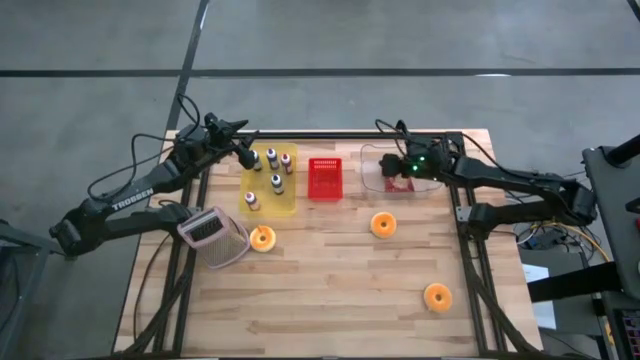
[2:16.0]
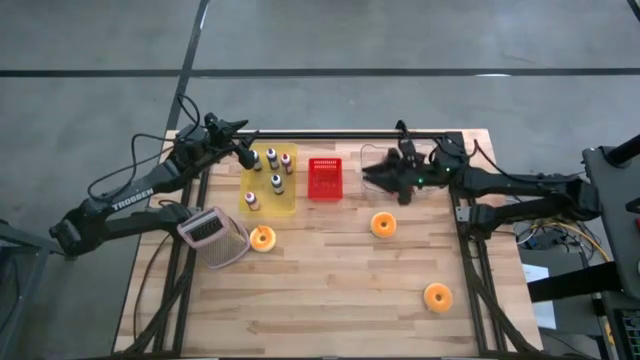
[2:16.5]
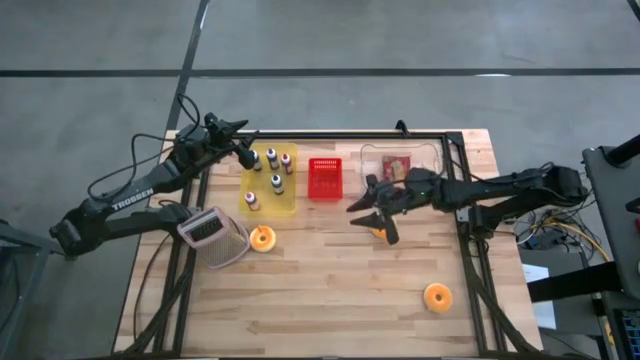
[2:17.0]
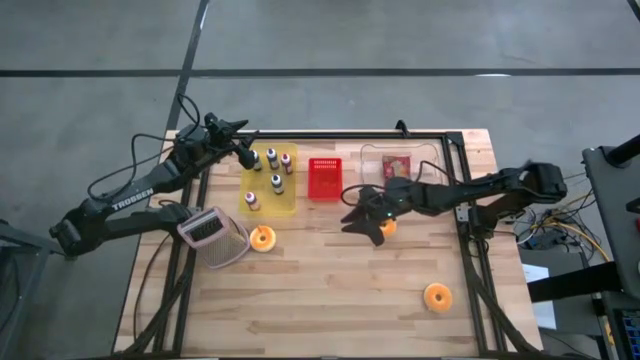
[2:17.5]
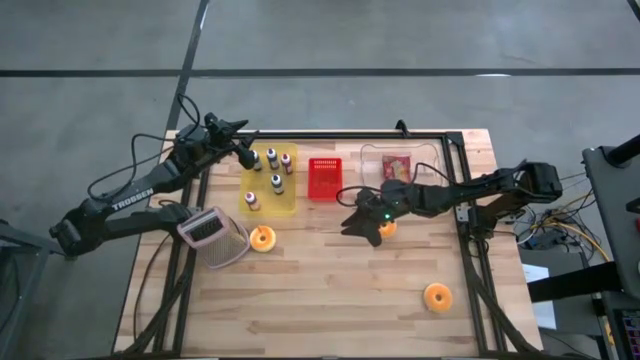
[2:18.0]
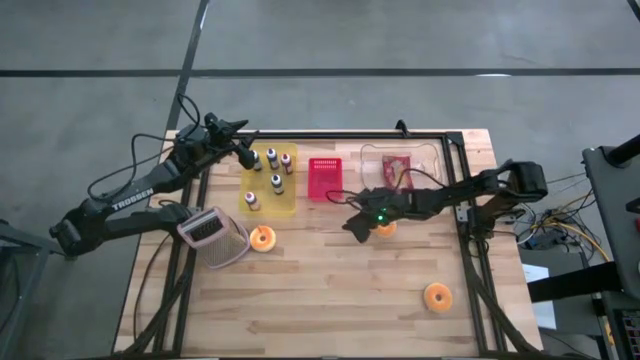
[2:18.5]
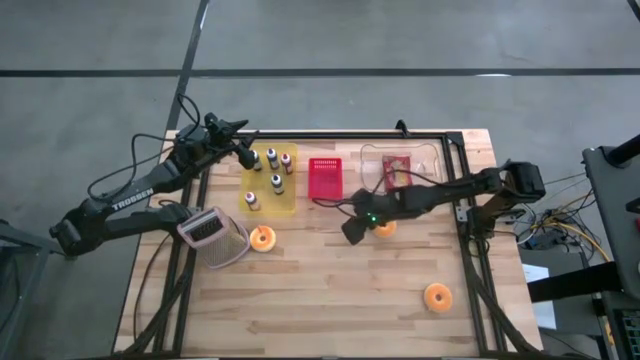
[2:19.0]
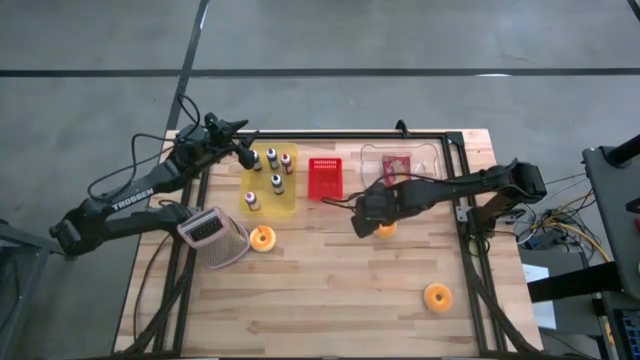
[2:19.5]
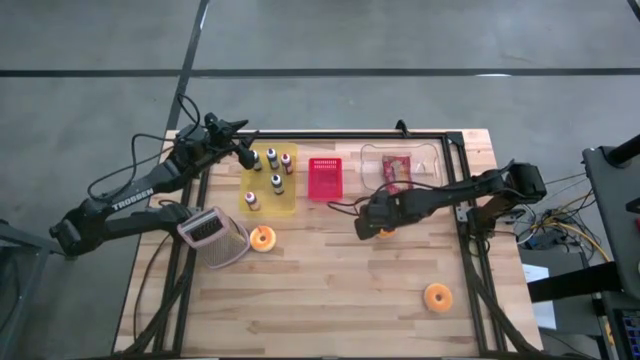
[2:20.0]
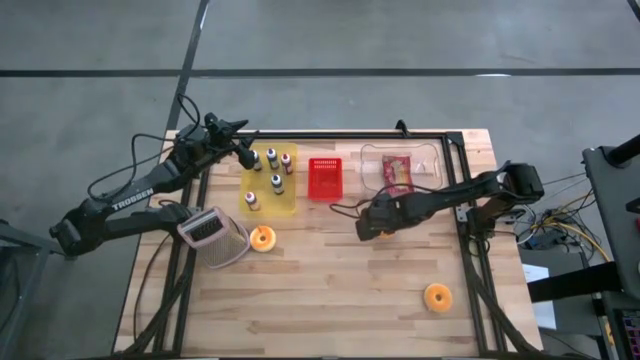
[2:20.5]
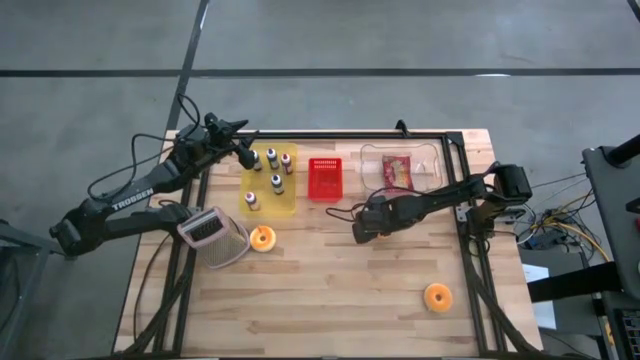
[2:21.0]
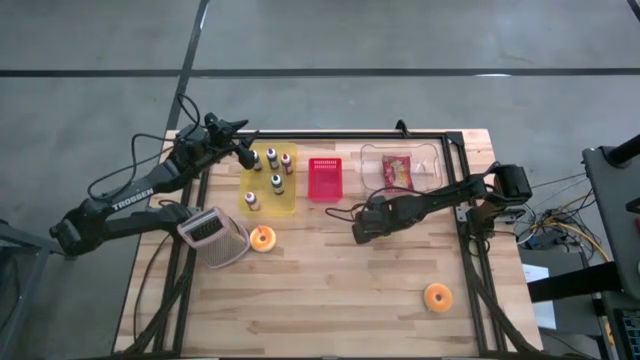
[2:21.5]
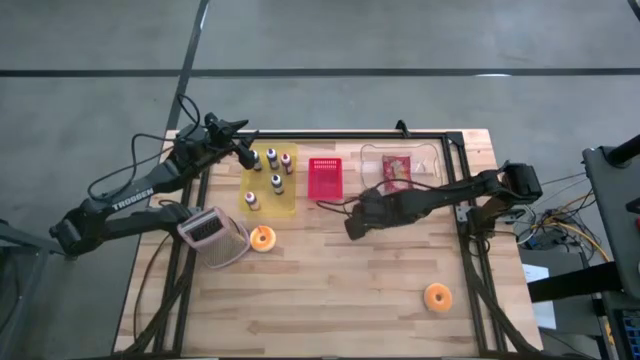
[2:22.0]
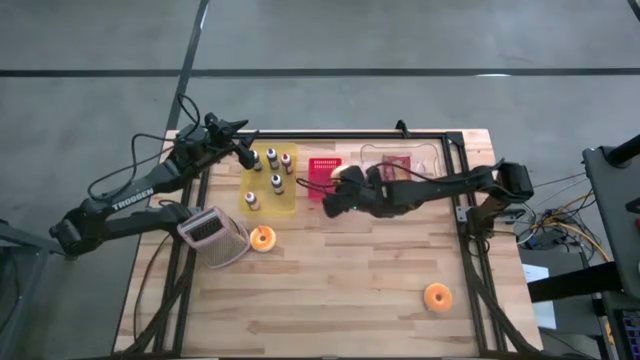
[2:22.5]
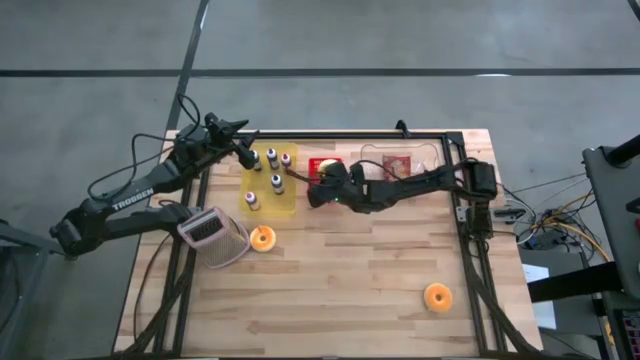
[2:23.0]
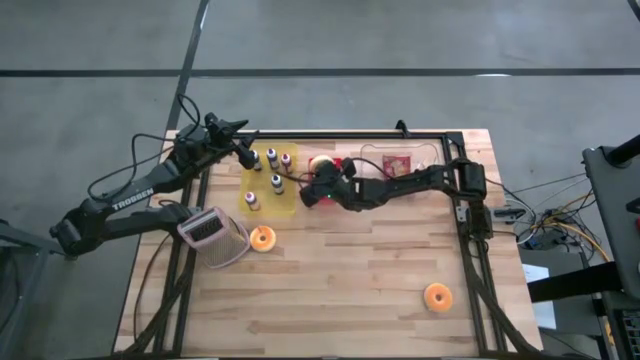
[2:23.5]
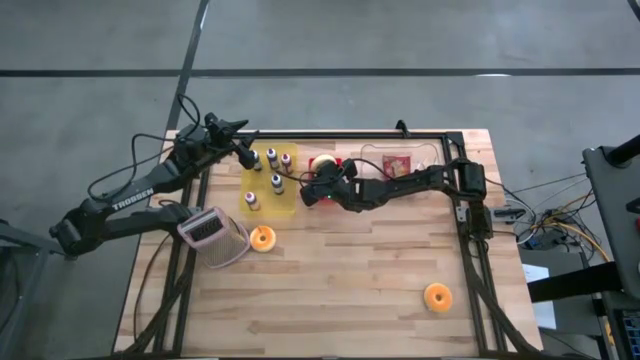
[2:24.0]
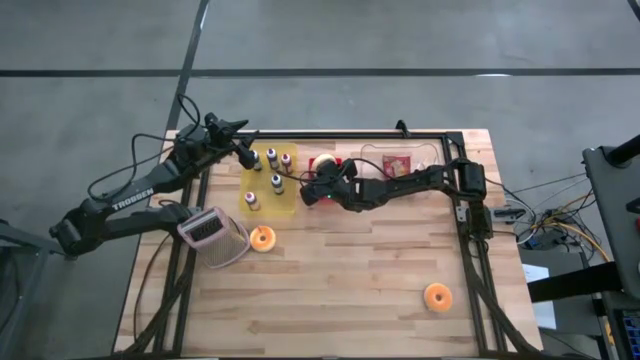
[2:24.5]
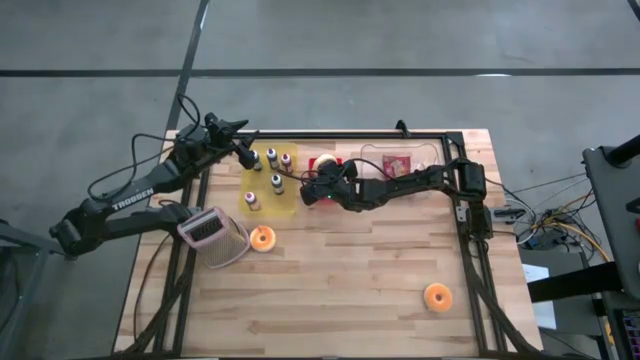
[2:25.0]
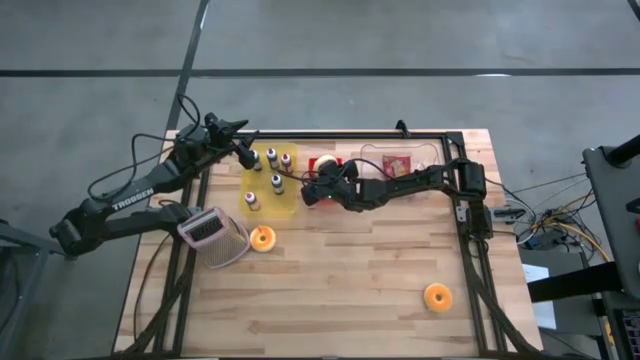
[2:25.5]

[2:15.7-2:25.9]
Task: Pick & Place Food Item
Put the top right orange donut into the red bin

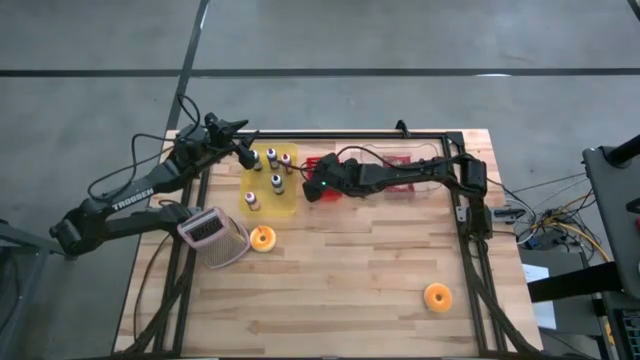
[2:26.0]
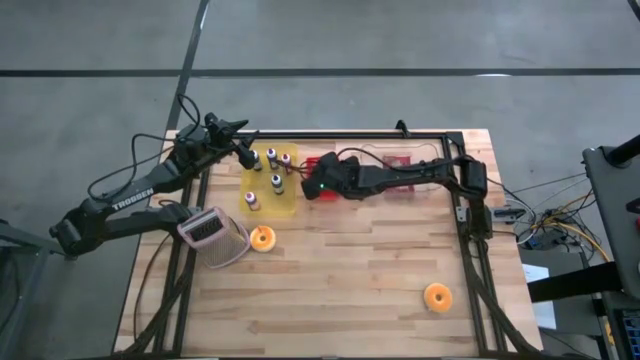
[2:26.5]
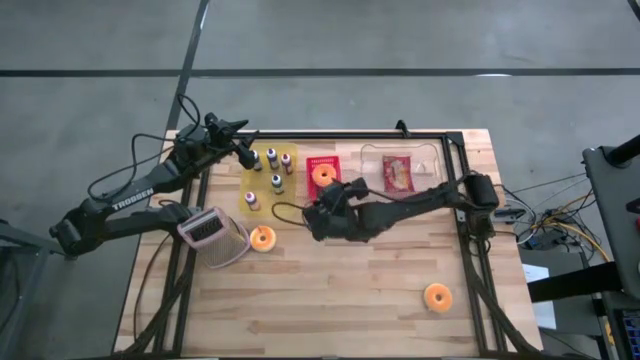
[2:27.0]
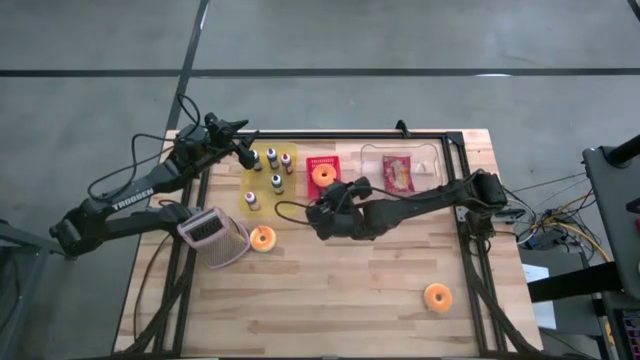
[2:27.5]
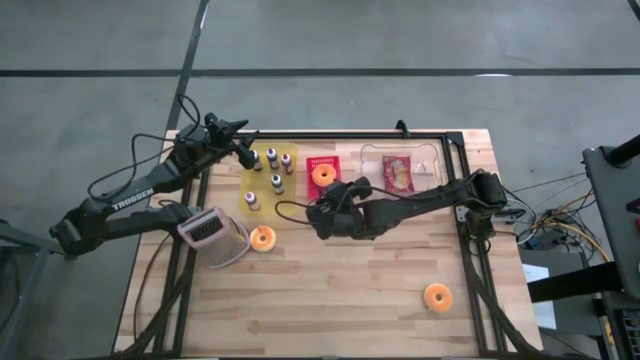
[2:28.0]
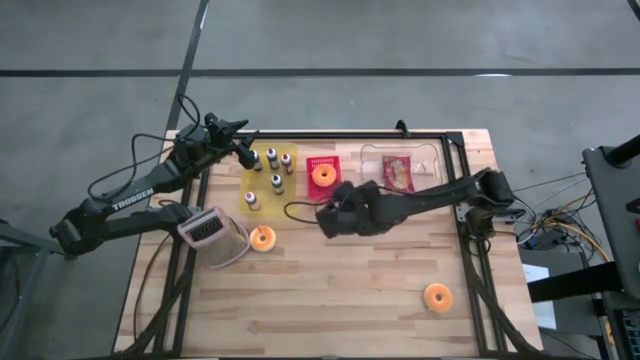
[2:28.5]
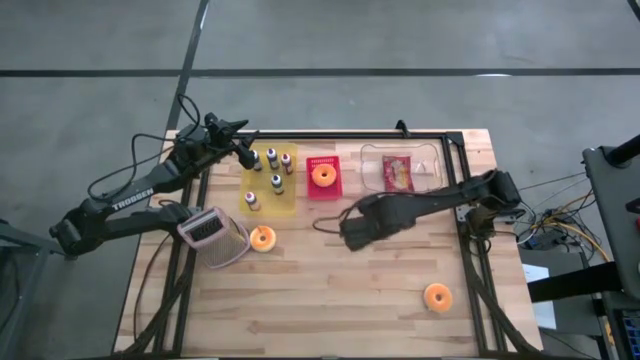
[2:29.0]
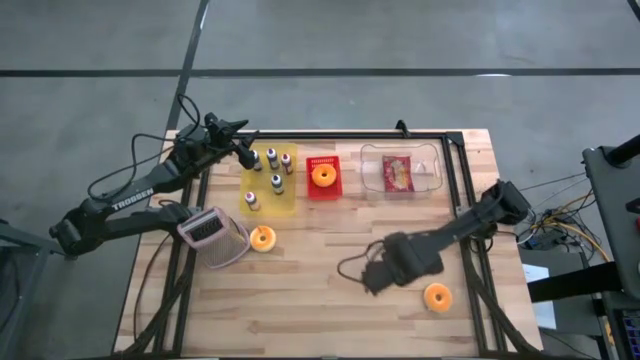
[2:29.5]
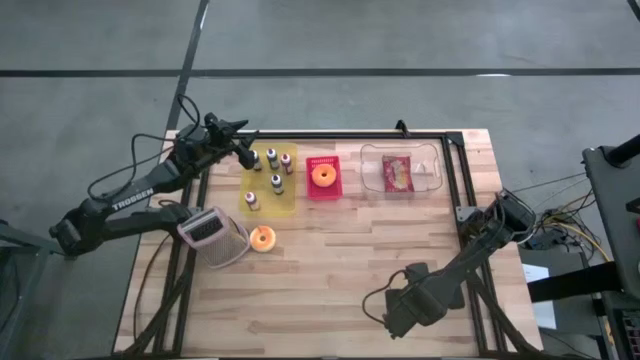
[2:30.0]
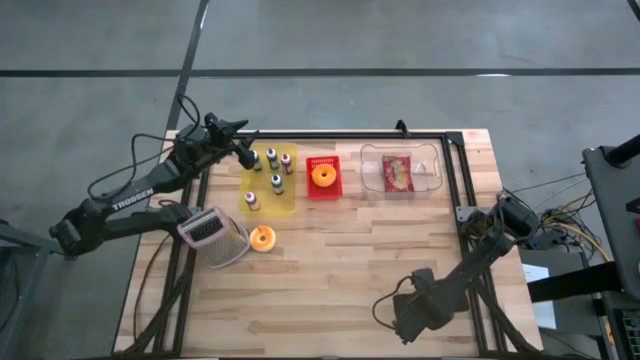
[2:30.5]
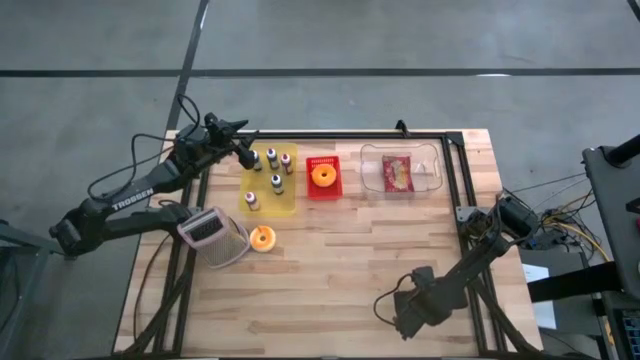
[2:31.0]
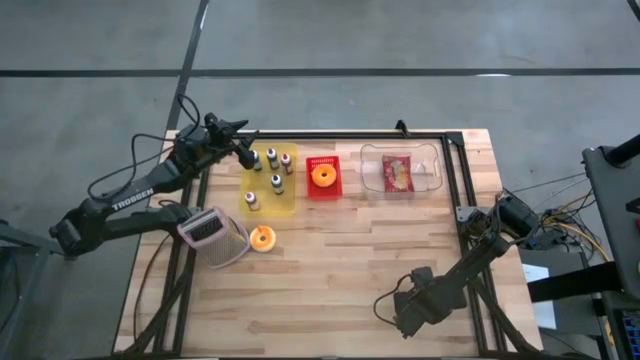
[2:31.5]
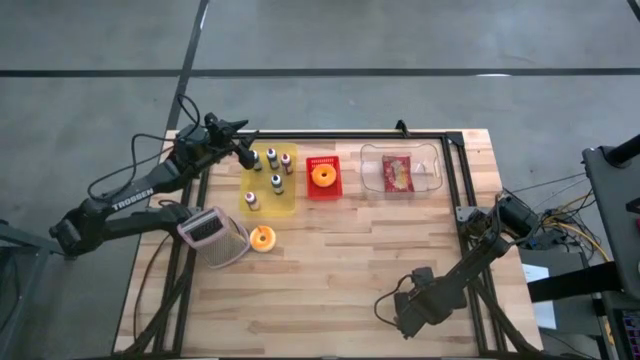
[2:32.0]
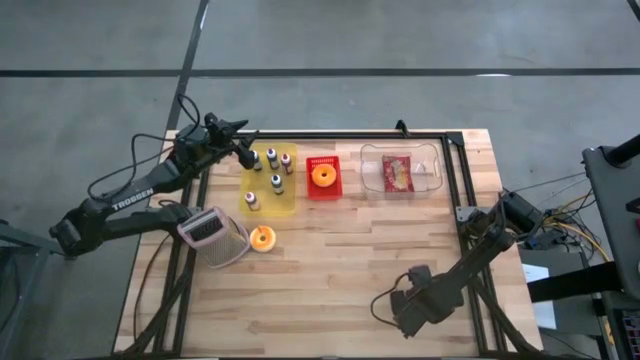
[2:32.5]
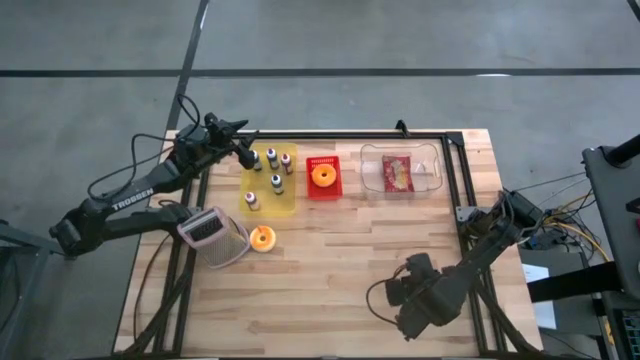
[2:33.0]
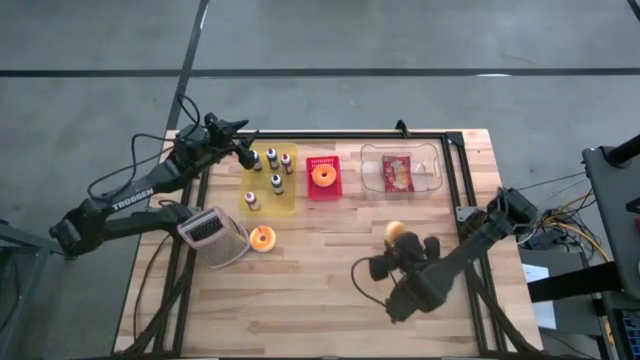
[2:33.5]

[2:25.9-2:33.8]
Put the right orange donut into the red bin

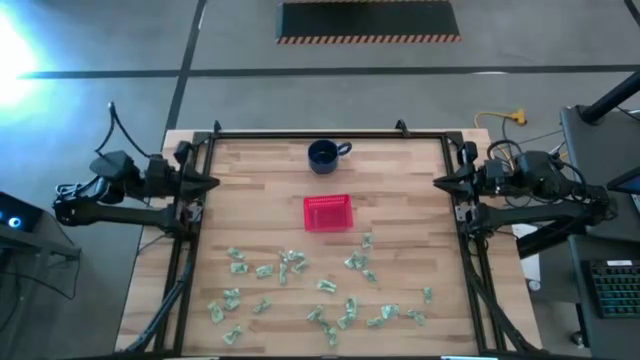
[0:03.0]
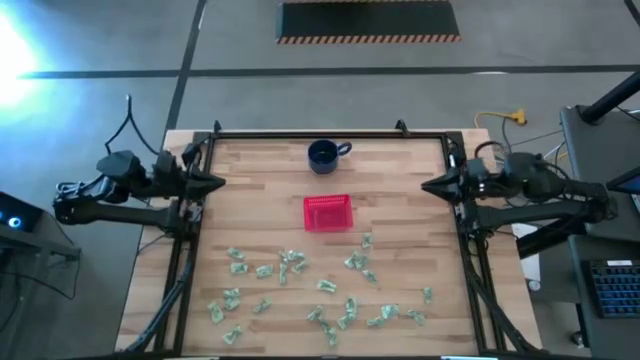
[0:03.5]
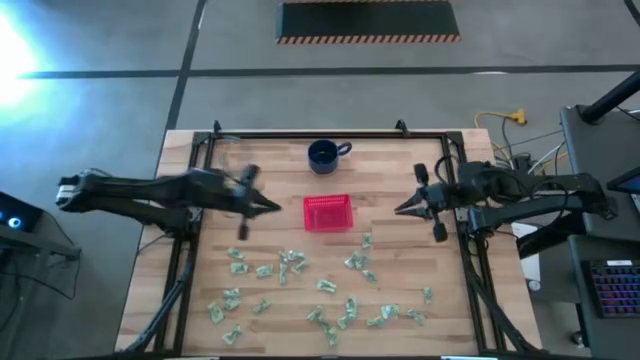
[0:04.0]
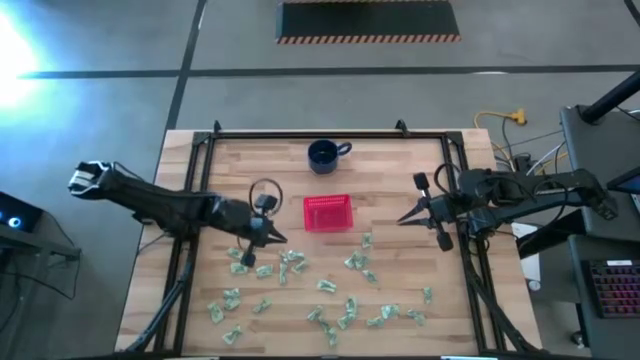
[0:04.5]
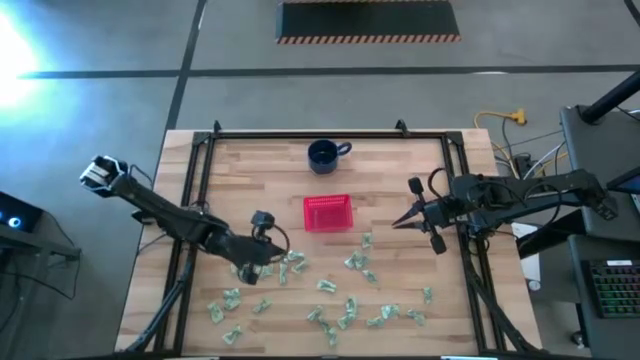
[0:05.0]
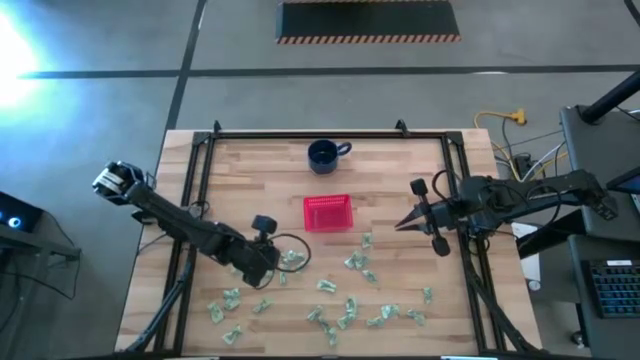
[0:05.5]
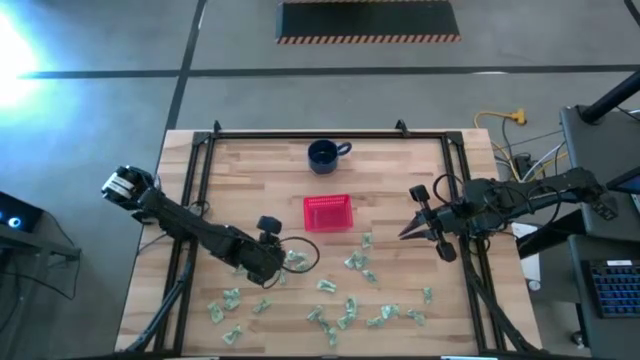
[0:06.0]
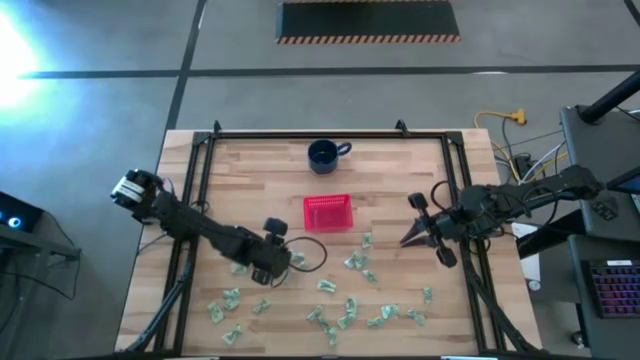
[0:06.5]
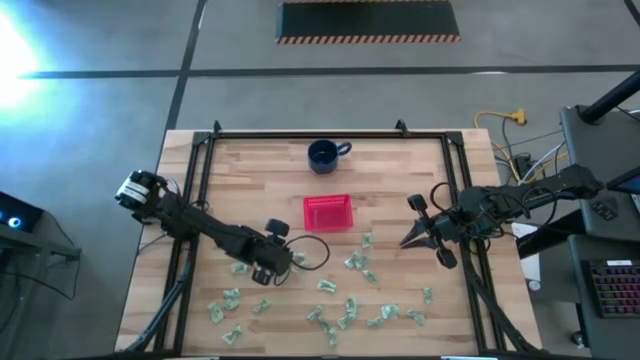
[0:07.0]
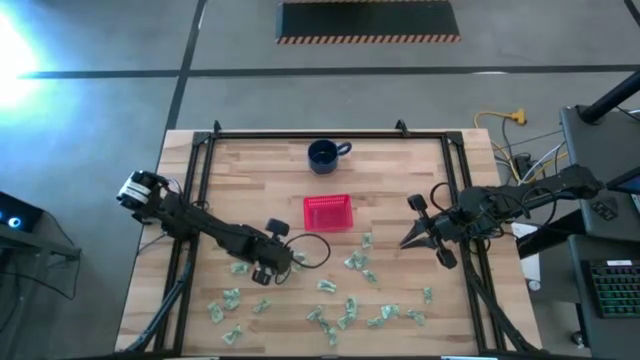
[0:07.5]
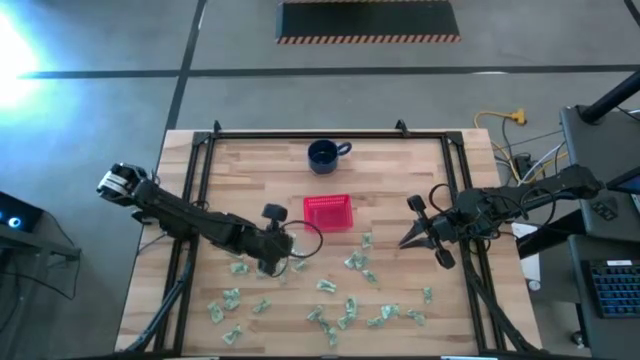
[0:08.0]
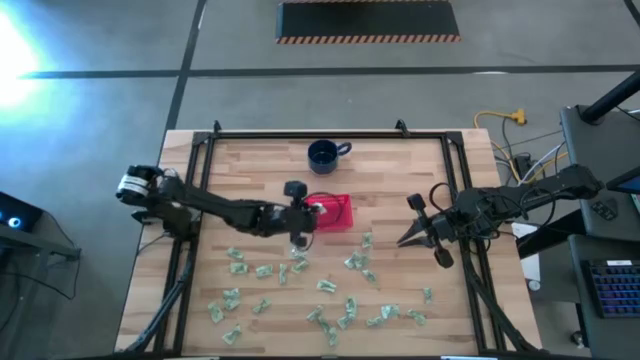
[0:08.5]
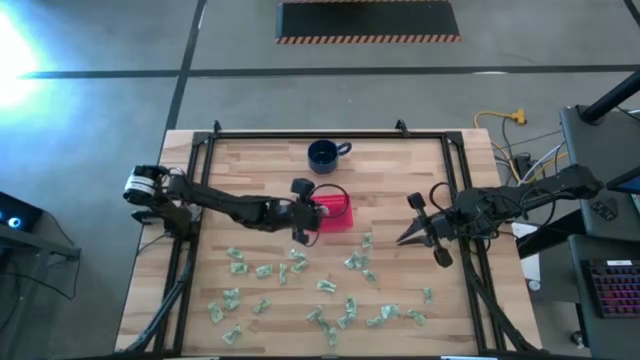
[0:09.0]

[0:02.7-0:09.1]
Task: Pick and place items into bin
Put the stevia packet into the red bin
